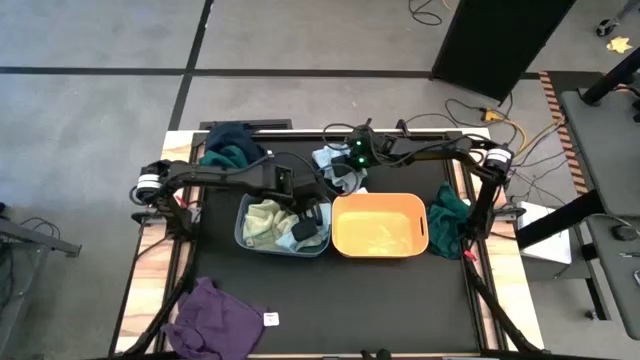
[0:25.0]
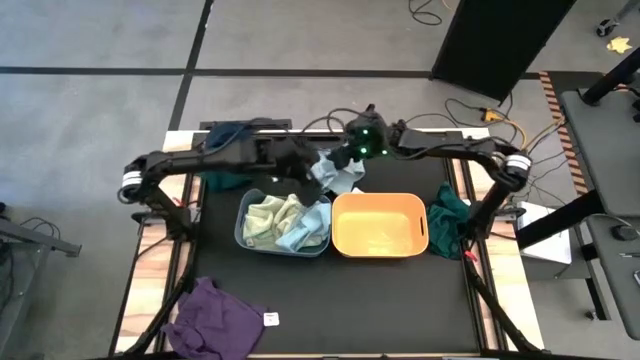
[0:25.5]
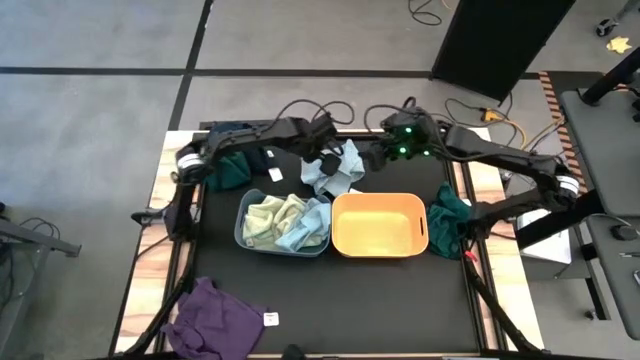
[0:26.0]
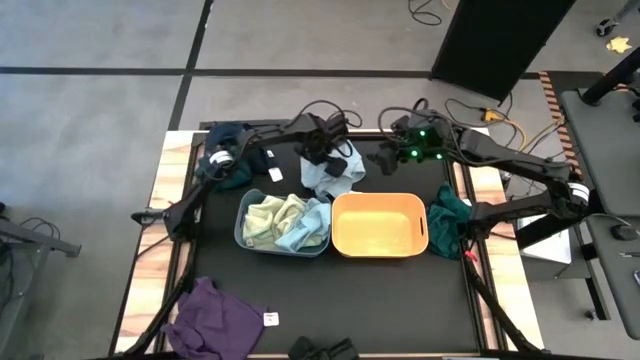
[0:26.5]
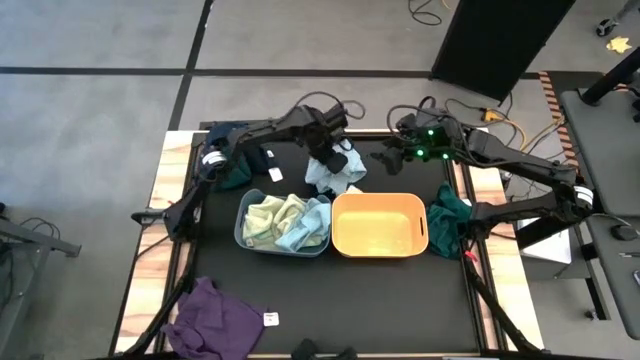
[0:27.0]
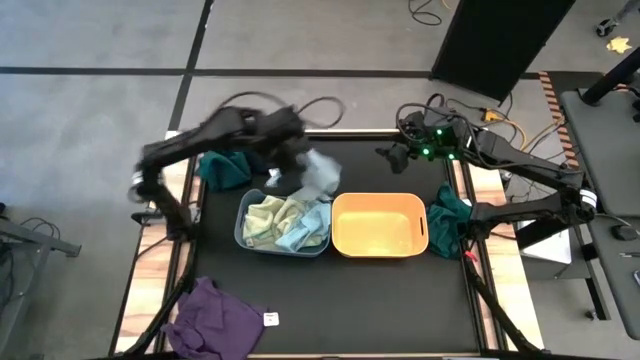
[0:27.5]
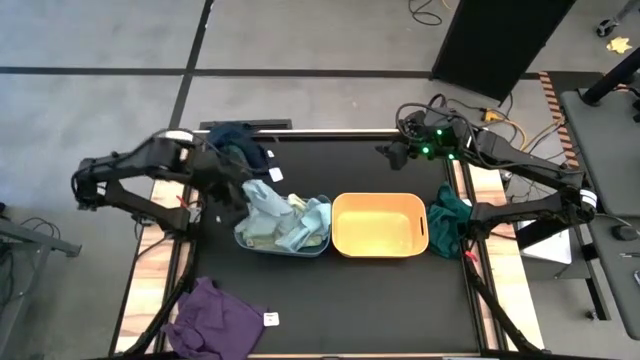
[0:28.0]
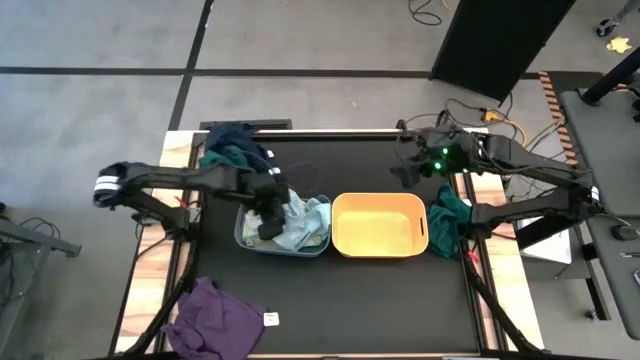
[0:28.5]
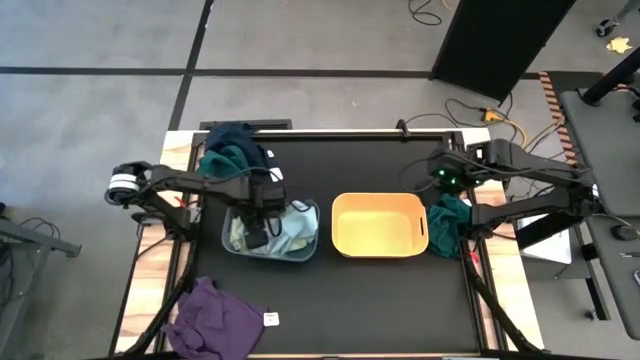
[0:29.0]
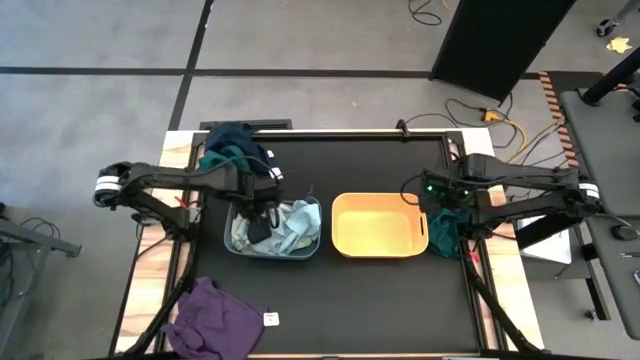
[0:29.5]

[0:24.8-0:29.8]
Task: Sort towels by color in basket
Put the light blue towel into the blue bin

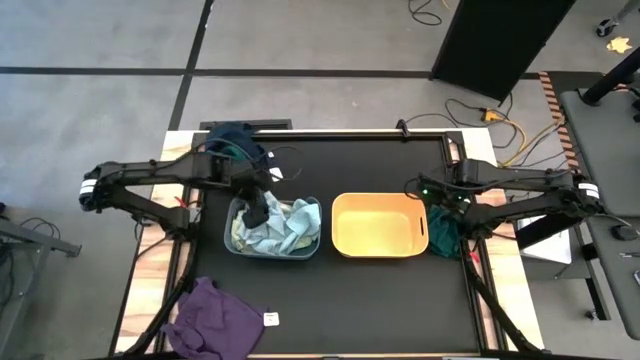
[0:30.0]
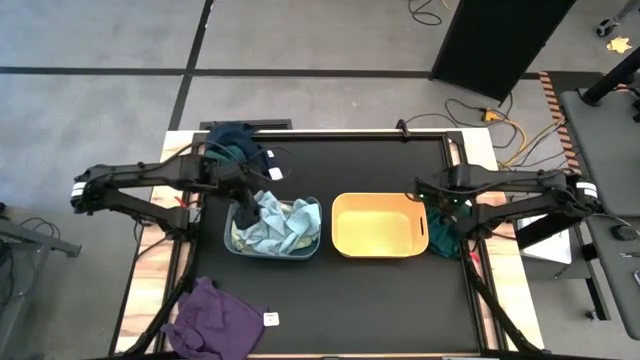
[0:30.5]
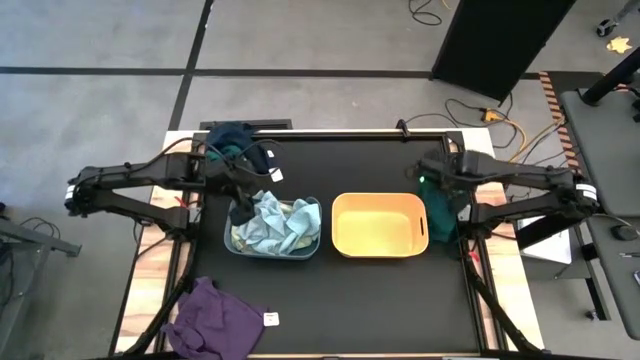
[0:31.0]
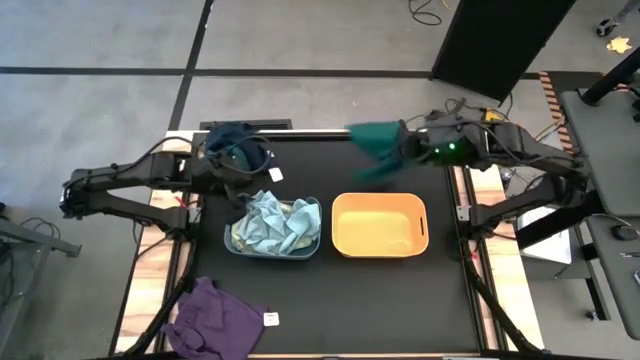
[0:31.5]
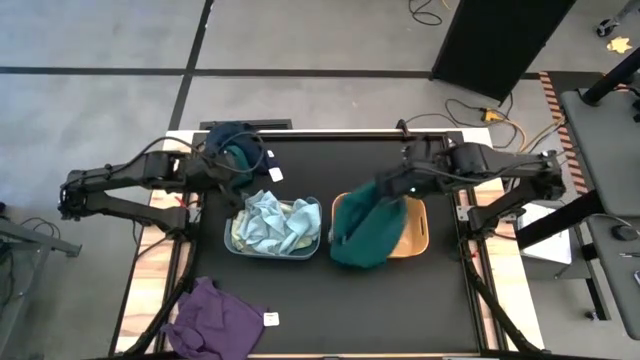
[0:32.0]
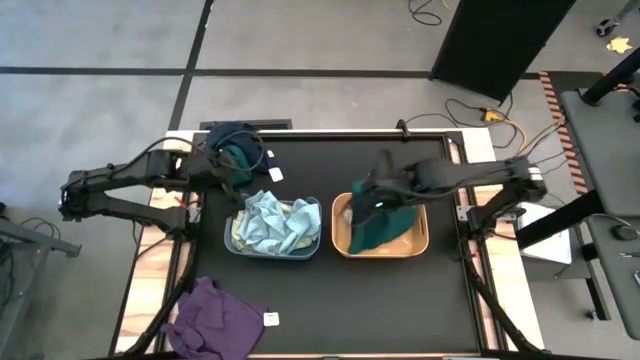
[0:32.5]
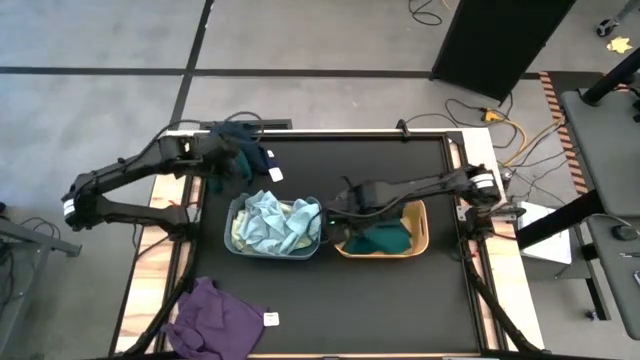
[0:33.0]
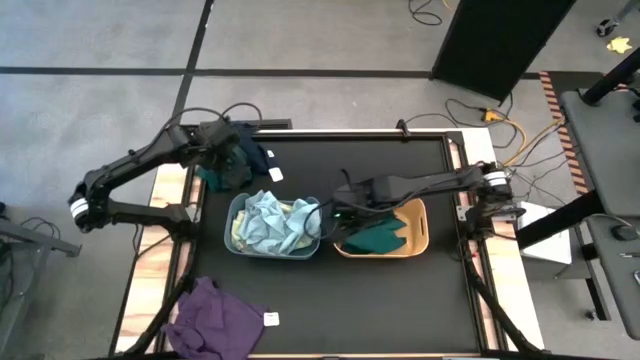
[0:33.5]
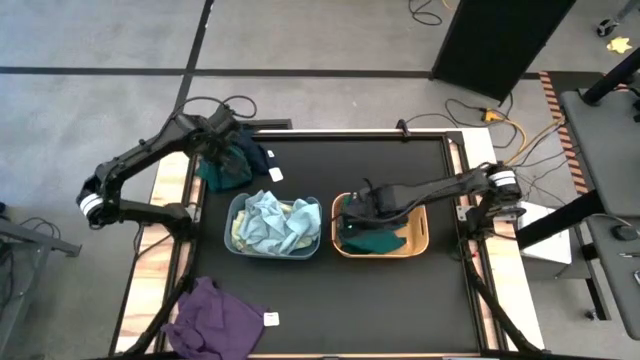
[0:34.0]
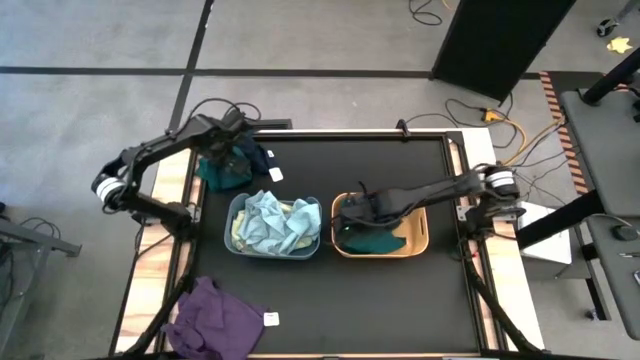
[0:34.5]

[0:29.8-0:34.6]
Put the dark green towel into the yellow bin

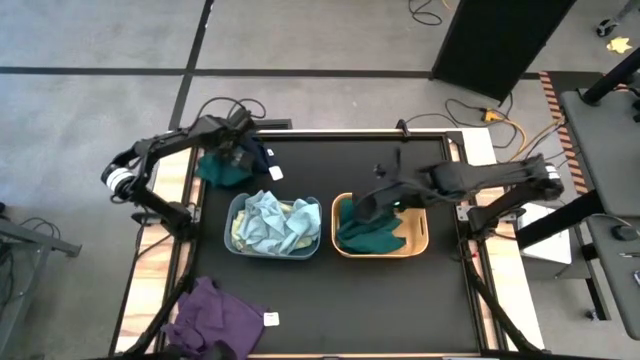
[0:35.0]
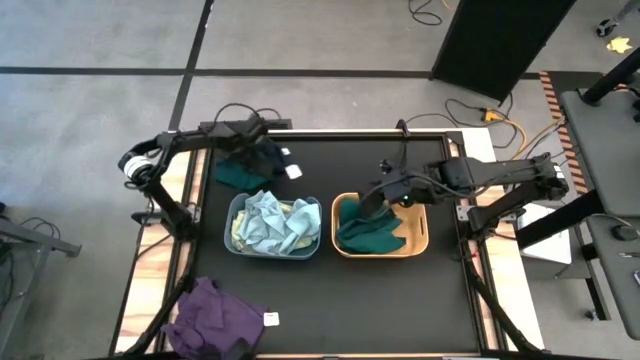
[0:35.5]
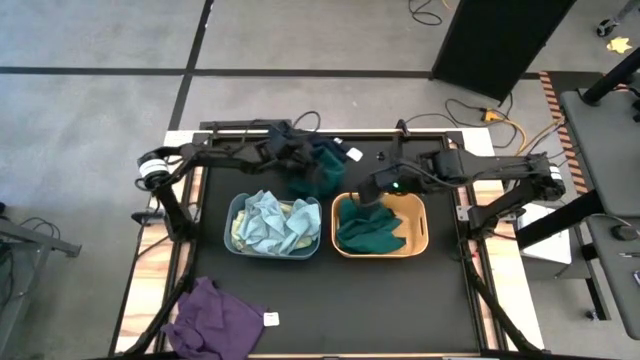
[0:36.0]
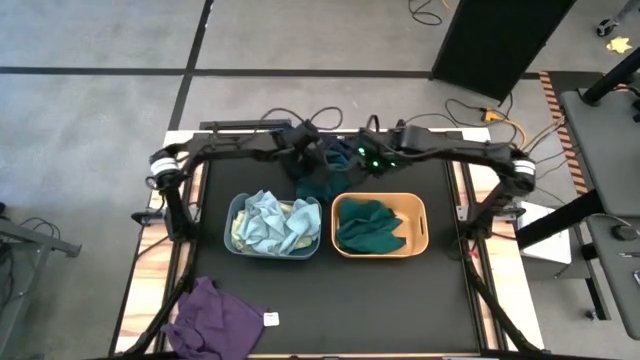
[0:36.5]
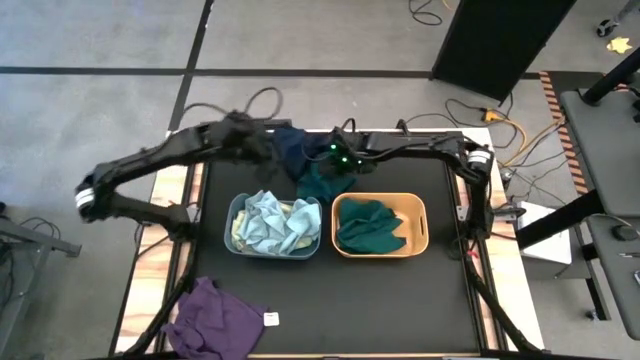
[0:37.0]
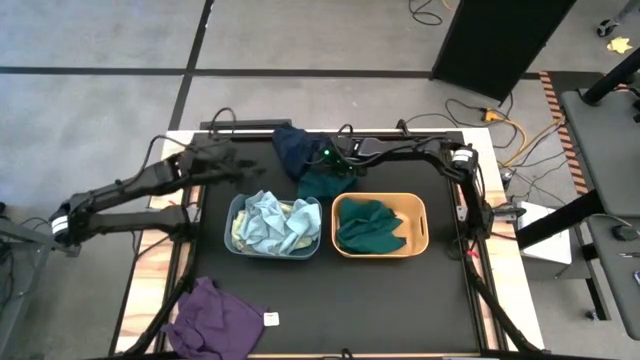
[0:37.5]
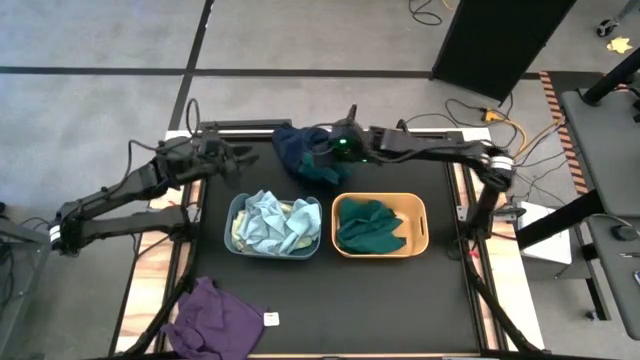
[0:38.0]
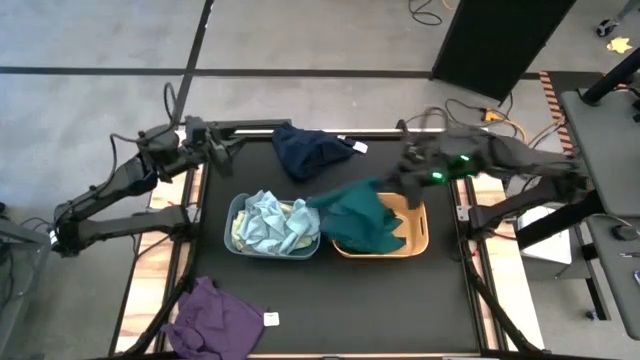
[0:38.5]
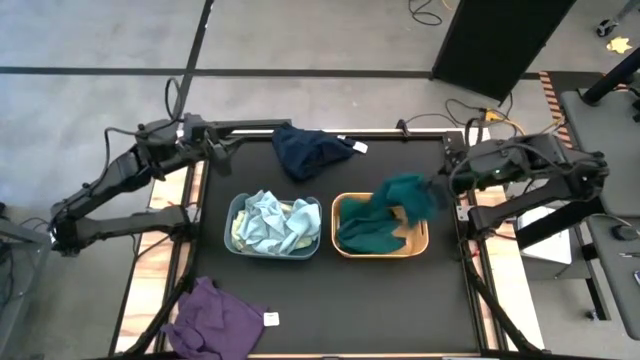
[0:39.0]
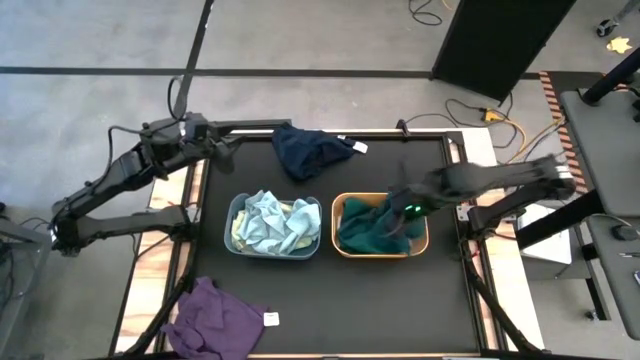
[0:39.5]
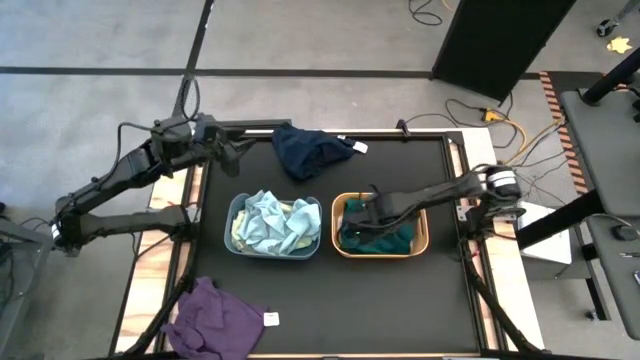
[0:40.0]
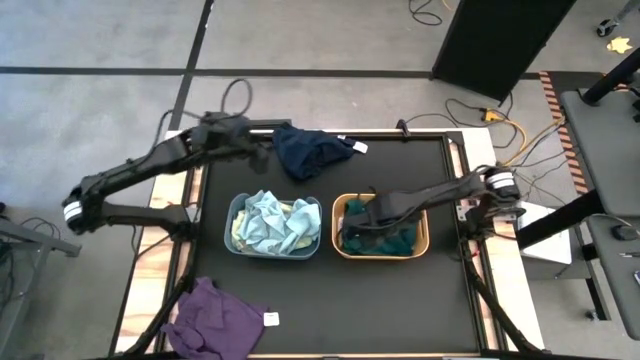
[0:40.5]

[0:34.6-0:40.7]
Put the dark green towel into the yellow bin

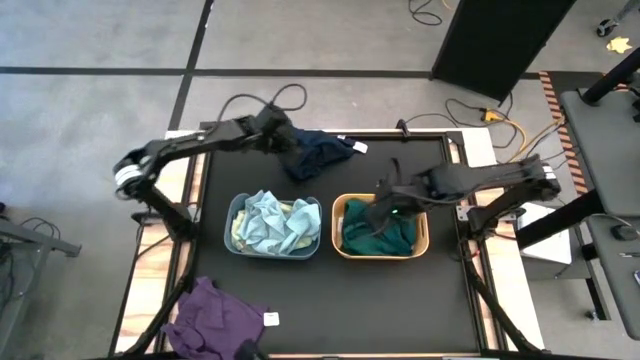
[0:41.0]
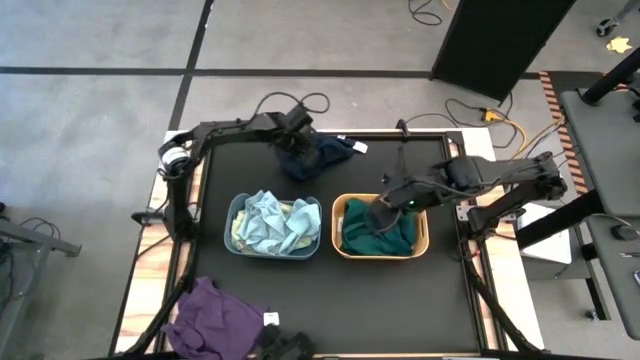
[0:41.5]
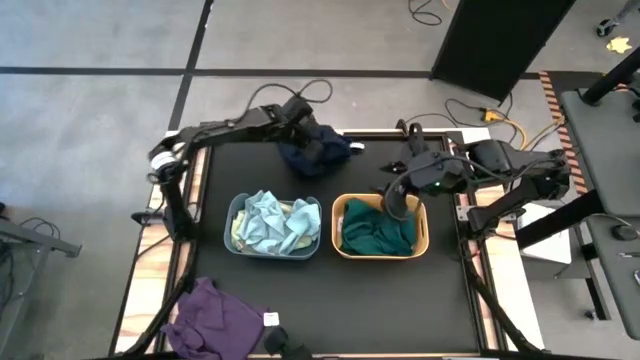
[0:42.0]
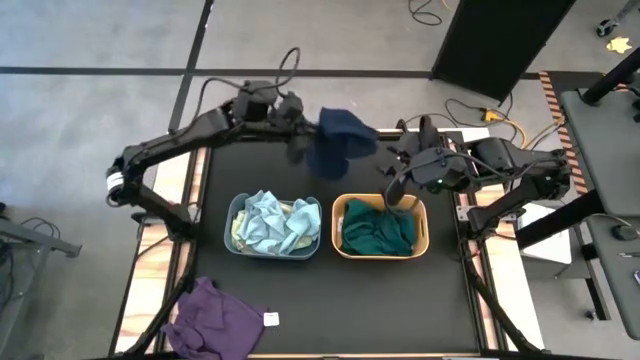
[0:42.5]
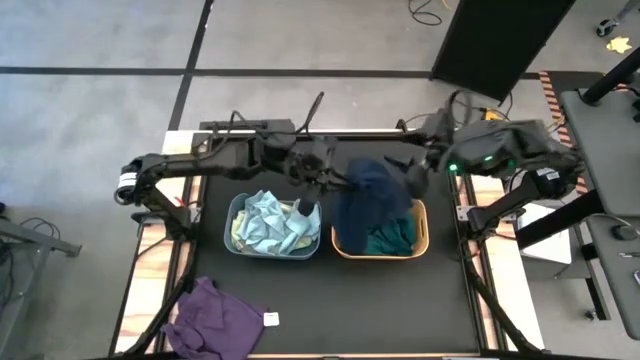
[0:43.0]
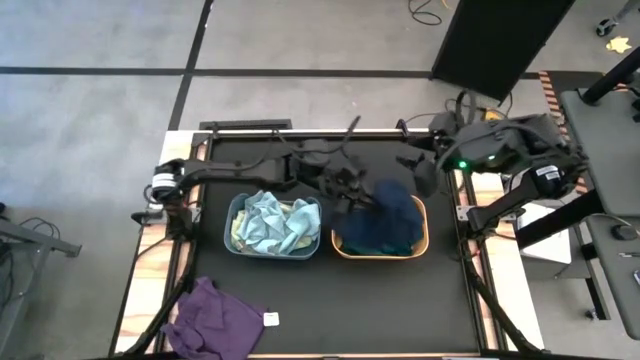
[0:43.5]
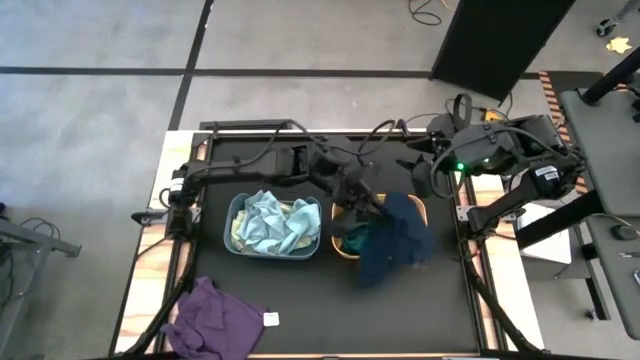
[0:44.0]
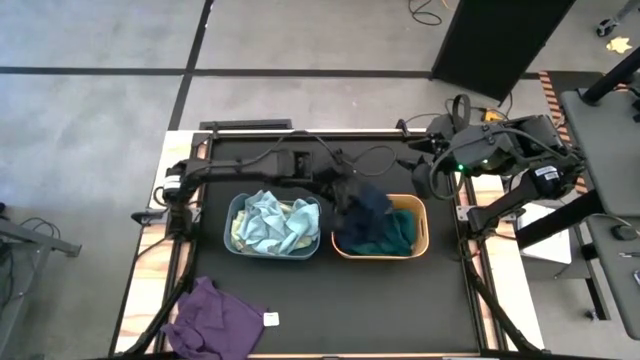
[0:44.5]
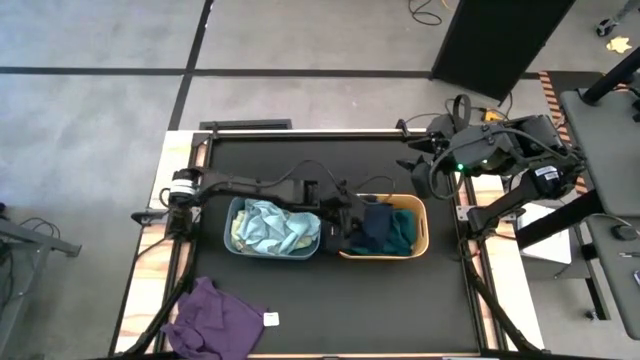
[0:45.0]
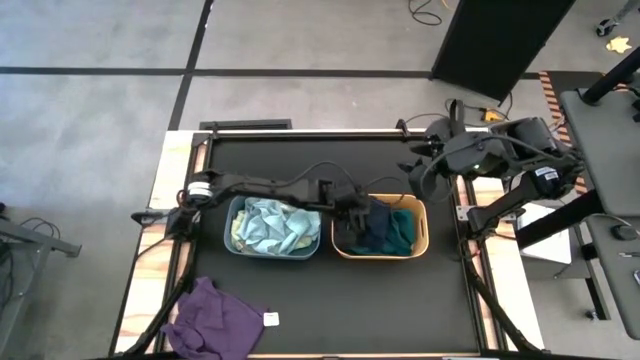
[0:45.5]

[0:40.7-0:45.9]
Put the dark blue towel into the yellow bin
